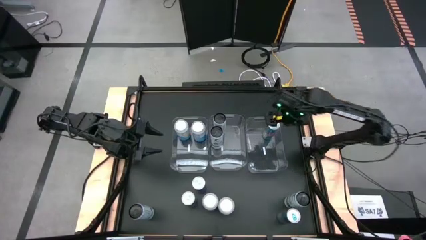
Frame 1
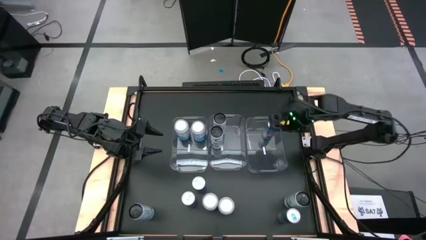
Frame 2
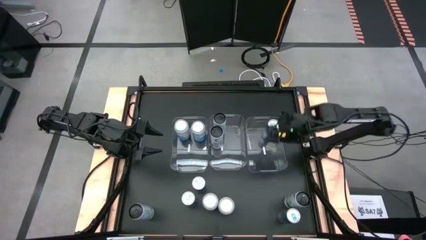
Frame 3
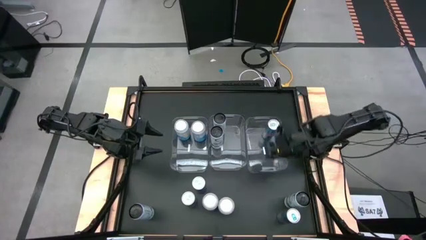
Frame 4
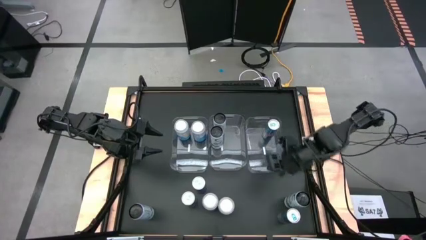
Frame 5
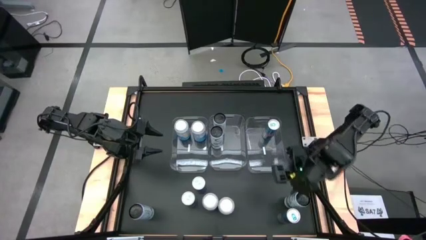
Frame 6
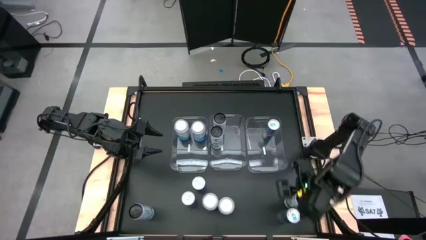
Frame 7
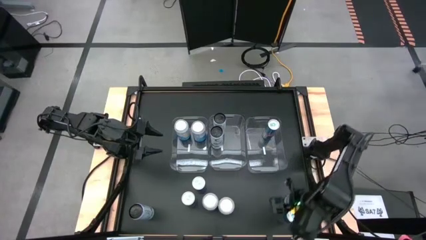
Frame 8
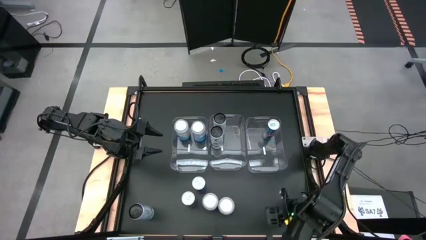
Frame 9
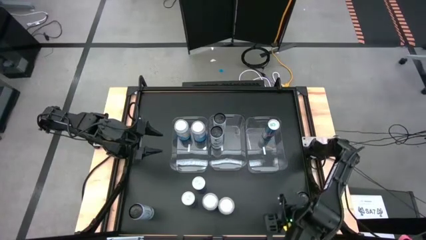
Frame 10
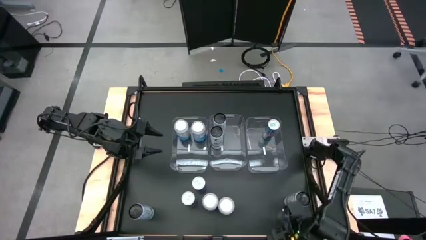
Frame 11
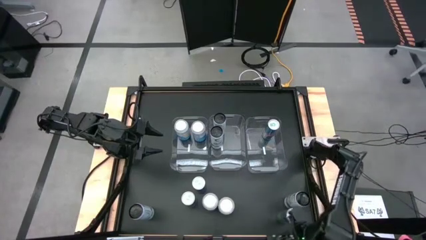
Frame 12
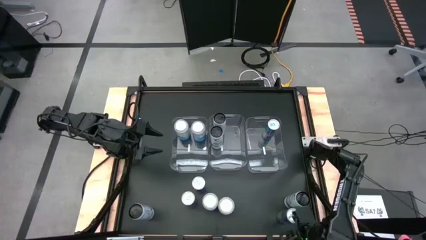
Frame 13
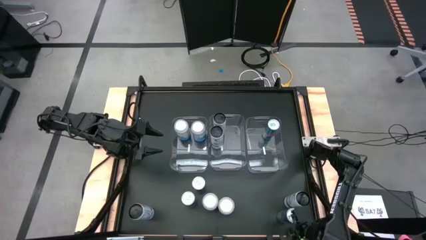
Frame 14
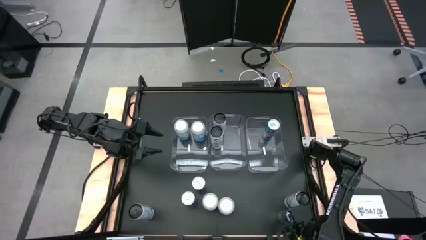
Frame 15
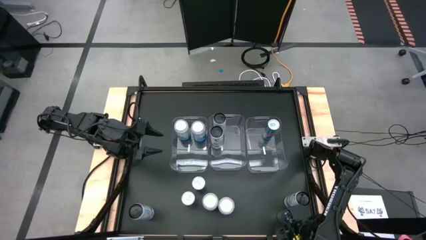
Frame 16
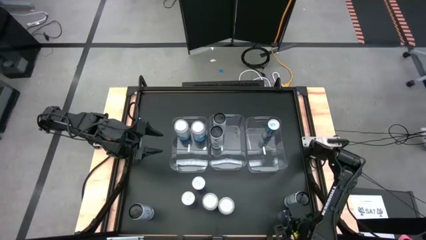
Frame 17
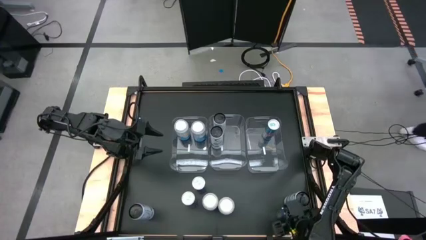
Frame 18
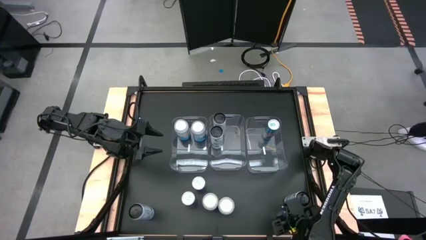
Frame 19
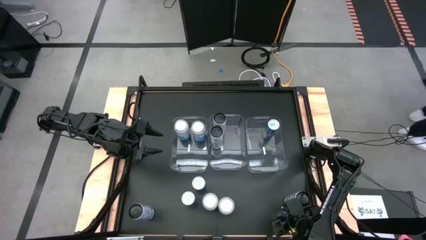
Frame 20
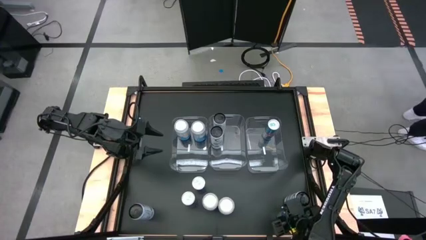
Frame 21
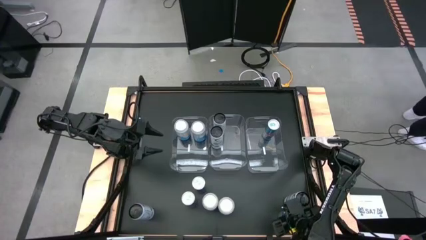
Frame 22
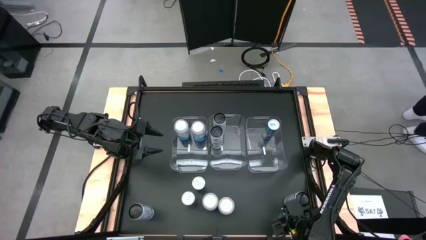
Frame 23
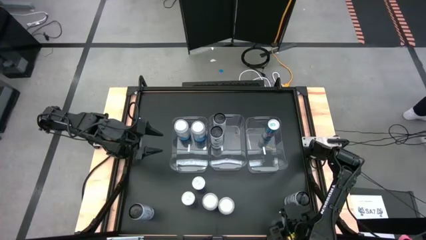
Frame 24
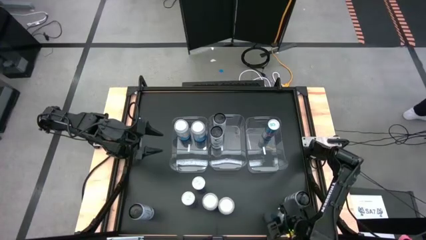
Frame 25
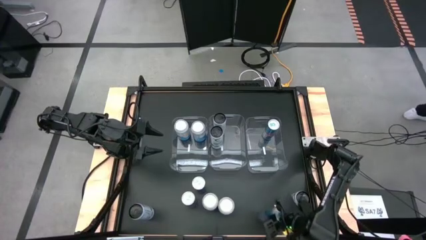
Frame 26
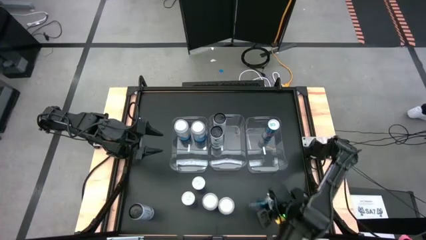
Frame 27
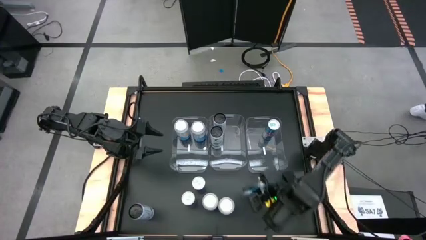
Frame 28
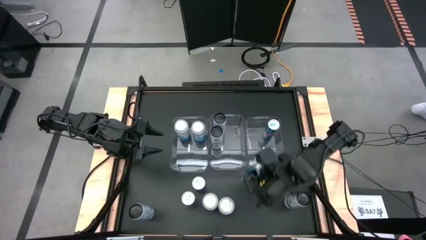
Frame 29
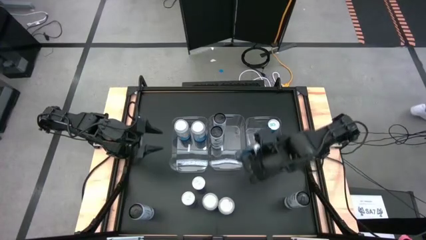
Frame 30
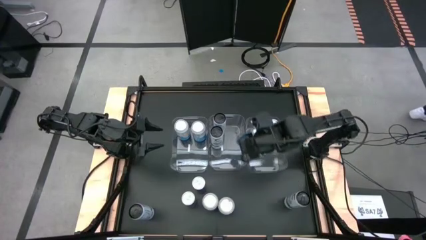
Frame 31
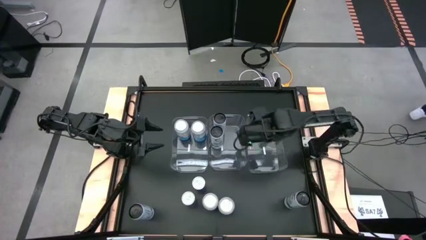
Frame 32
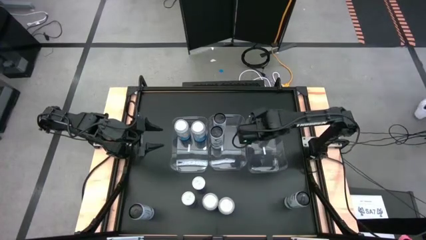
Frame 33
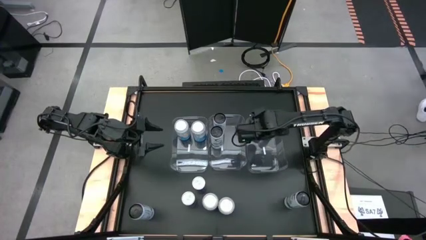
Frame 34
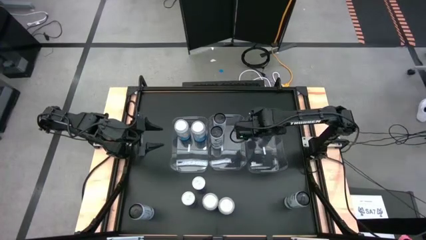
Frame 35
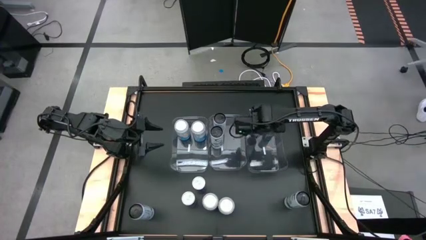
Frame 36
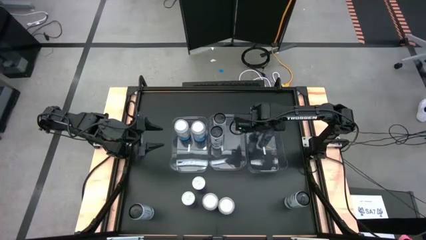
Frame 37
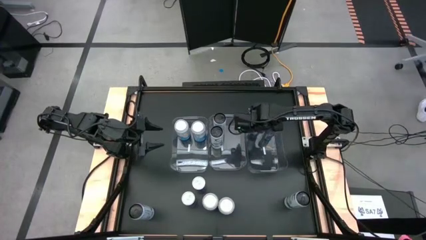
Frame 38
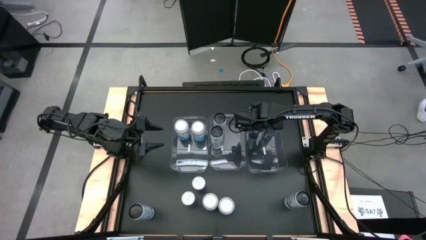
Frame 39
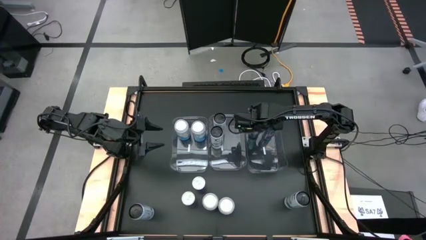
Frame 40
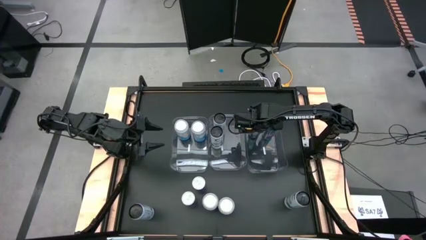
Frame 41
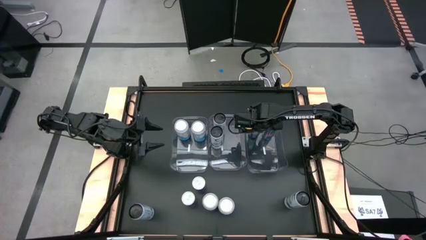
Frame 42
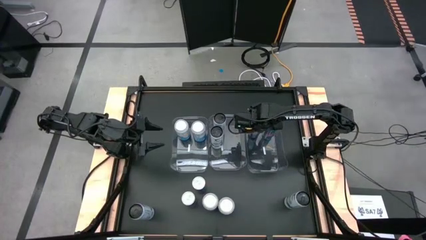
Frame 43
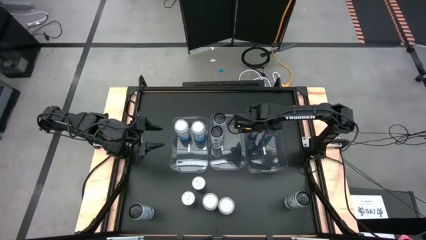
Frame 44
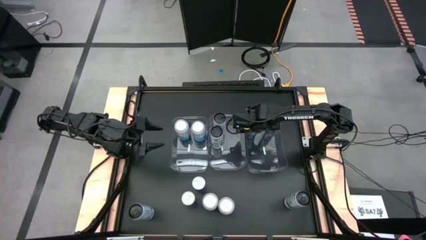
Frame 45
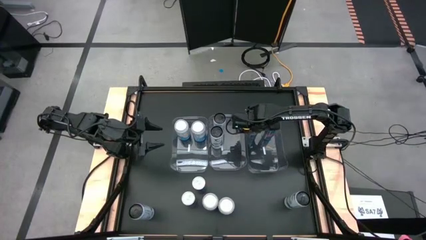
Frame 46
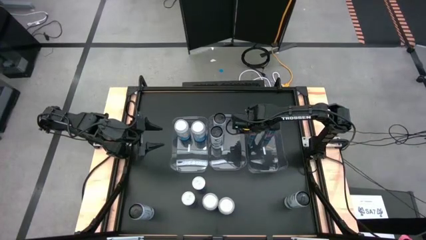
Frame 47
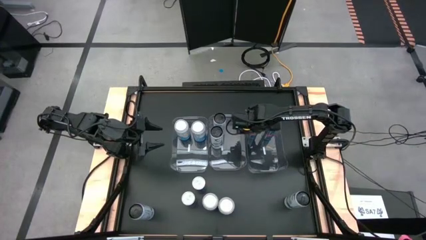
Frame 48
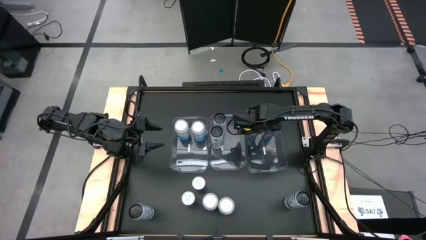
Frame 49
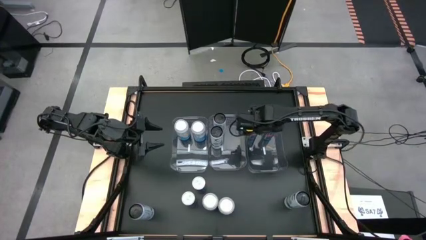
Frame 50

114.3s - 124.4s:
Task: Sort soda cans
Put the bottom right blue soda can into the right transparent bin

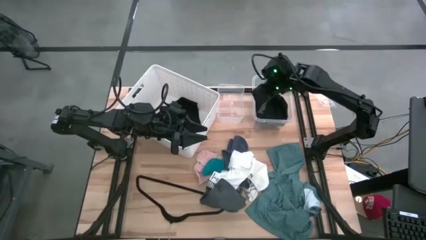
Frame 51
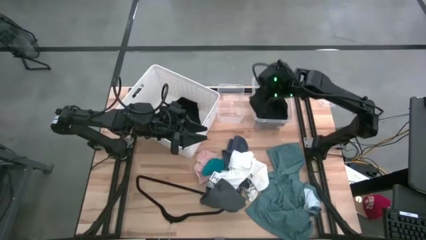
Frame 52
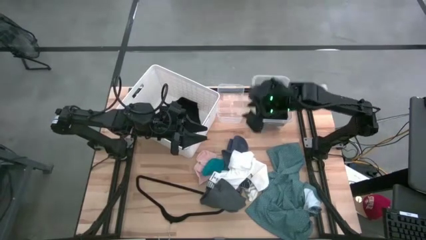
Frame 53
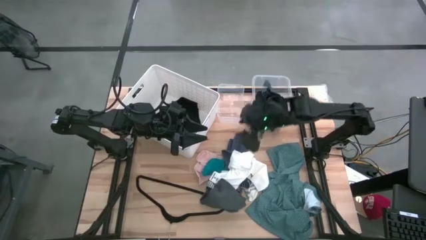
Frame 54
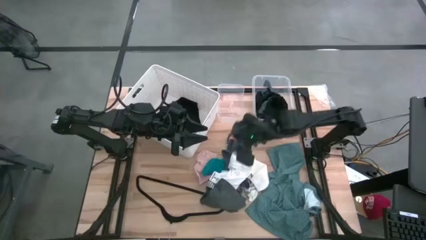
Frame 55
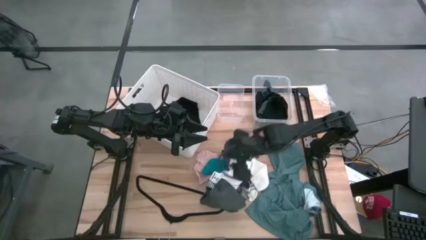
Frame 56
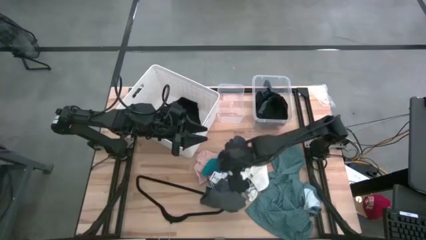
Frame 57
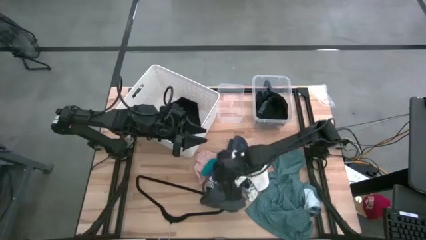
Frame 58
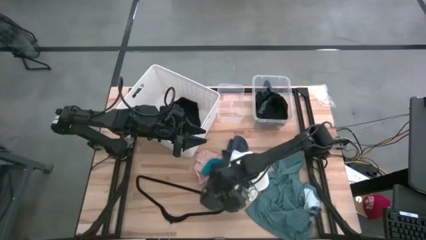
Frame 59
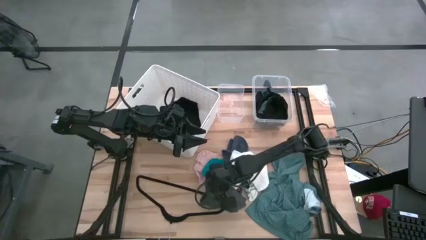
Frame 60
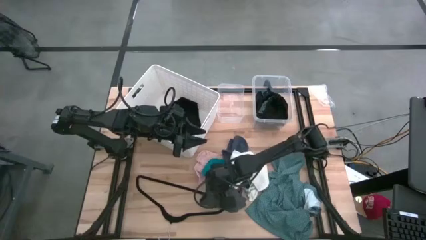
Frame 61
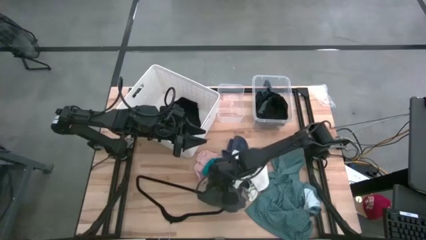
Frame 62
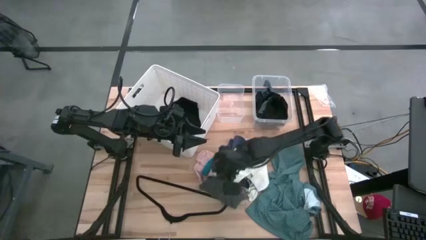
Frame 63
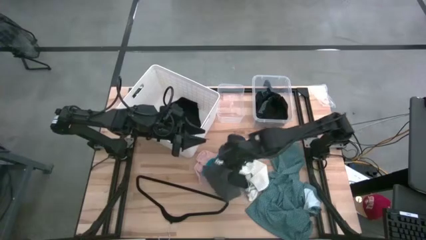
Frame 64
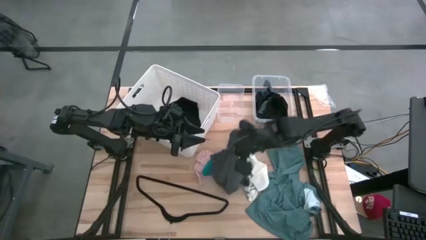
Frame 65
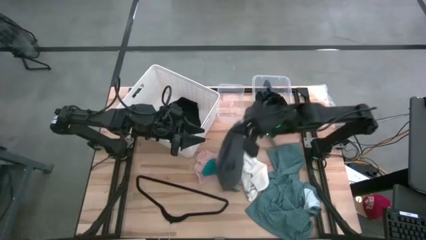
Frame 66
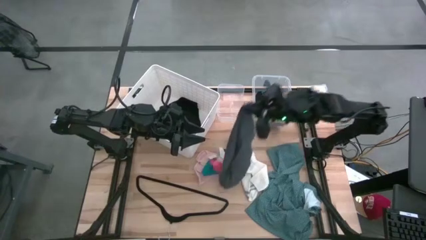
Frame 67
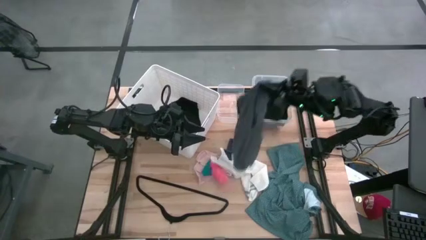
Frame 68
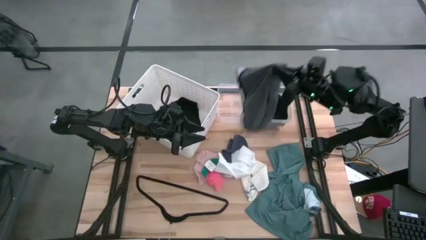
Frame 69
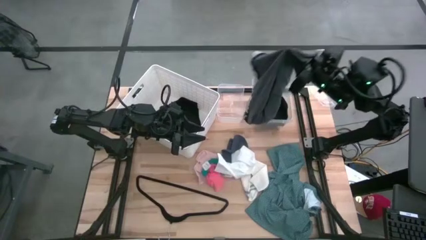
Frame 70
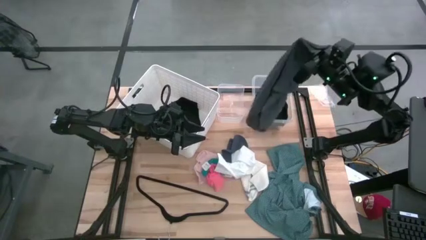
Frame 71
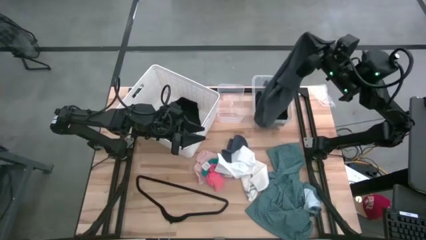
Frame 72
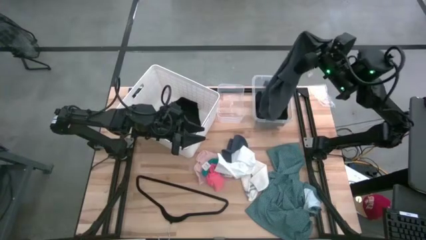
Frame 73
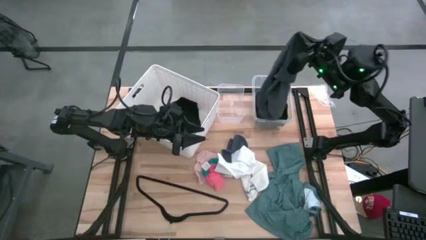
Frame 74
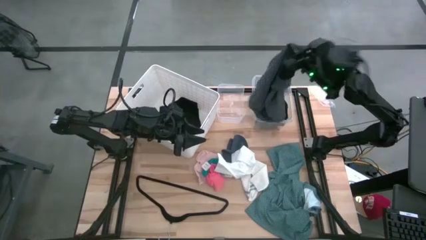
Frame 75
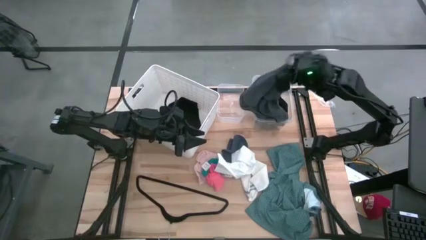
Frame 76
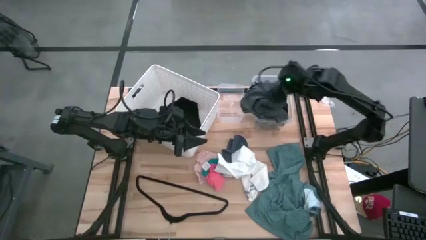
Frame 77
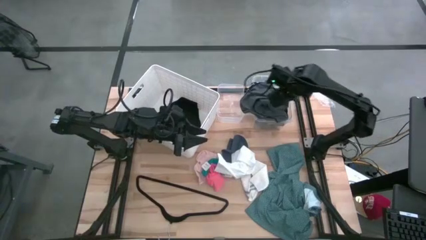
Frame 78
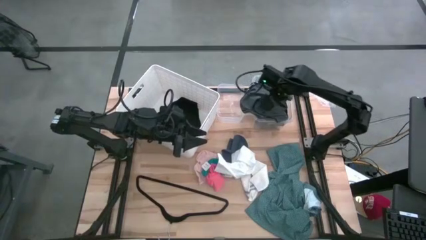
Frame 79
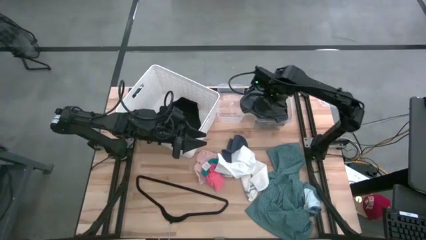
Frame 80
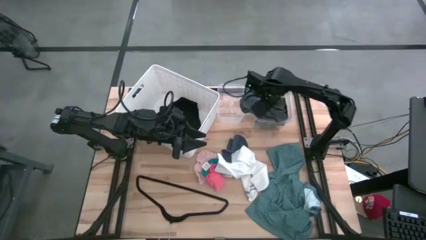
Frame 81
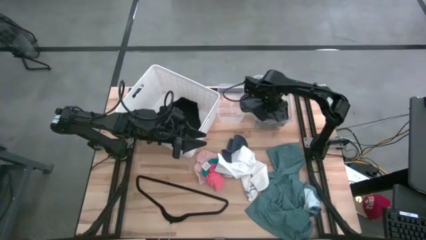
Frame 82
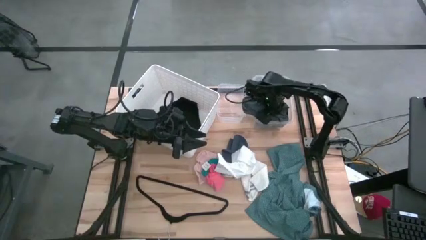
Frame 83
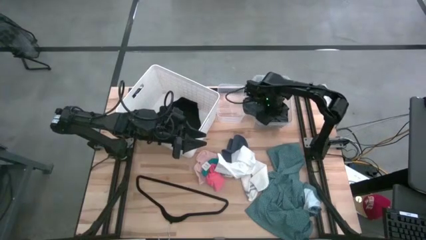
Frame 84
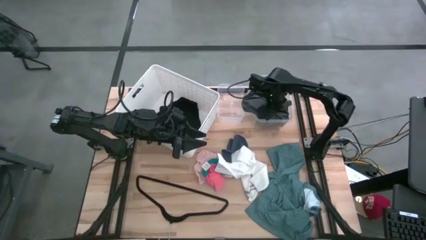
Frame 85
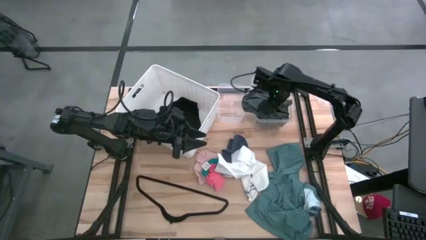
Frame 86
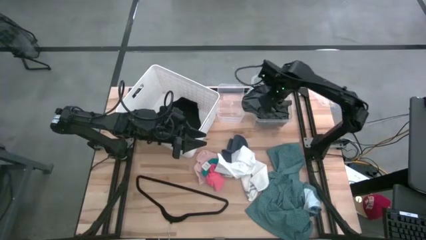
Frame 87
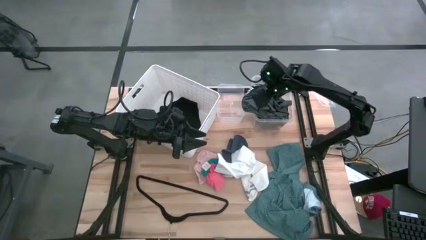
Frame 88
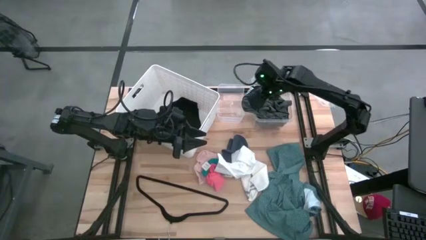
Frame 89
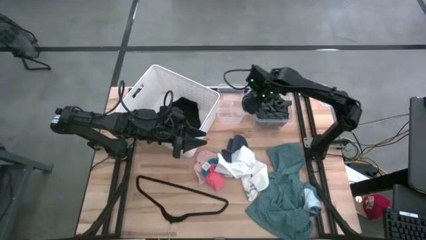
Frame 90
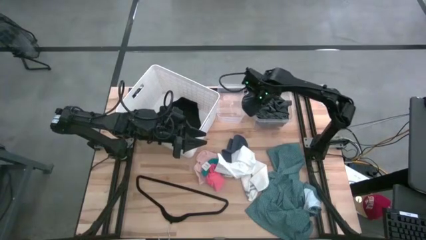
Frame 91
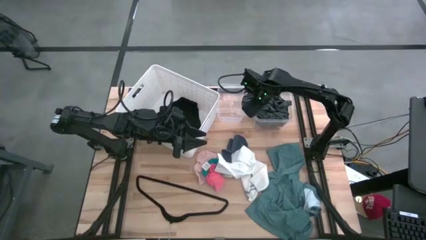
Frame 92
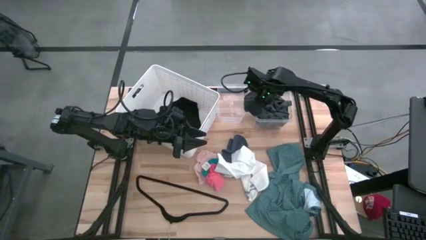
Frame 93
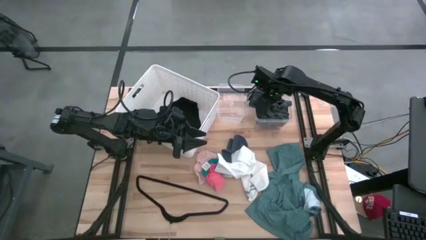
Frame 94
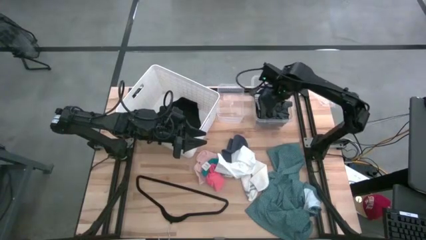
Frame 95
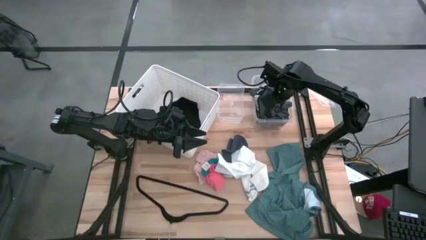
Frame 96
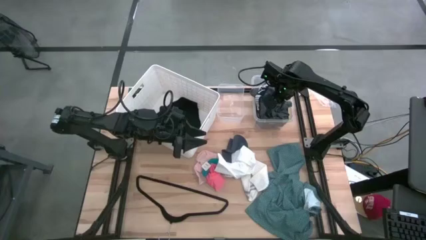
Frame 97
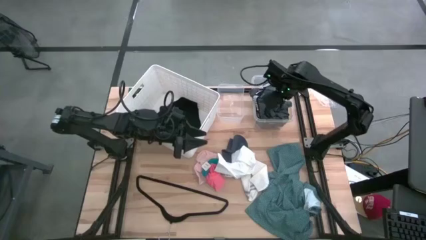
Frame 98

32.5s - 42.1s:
Task: Pick & Place Cloths
Put the gray underwear into the right transparent bin
